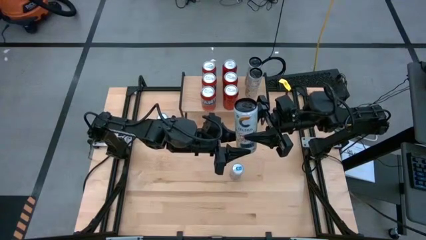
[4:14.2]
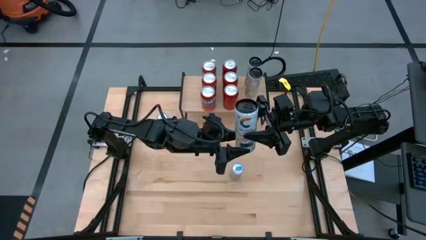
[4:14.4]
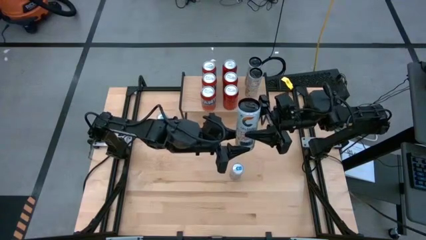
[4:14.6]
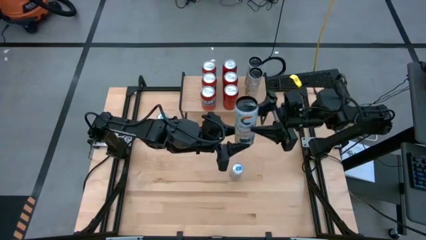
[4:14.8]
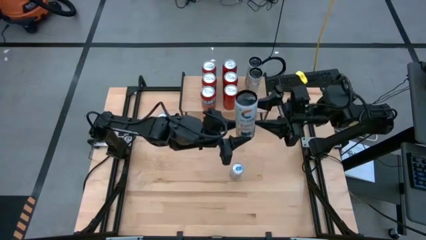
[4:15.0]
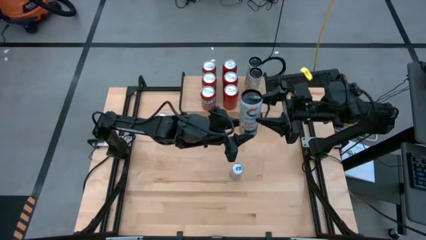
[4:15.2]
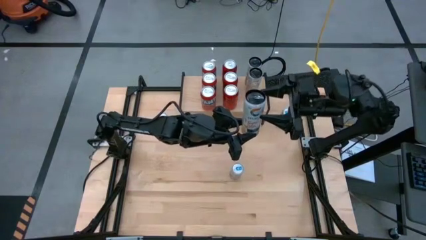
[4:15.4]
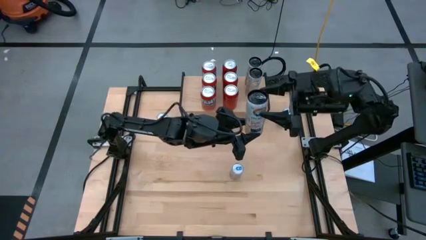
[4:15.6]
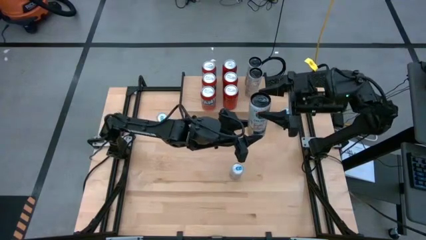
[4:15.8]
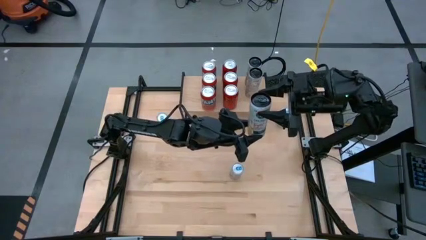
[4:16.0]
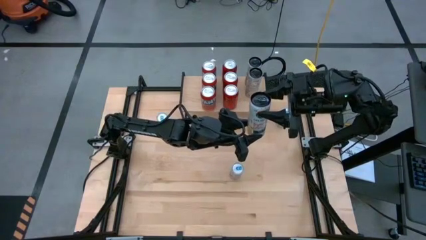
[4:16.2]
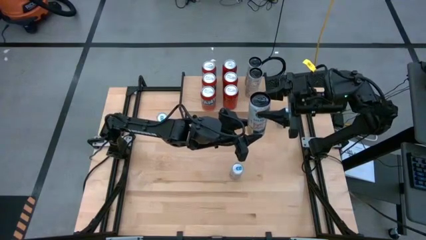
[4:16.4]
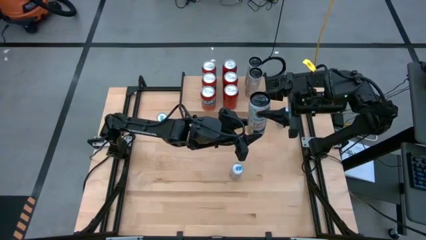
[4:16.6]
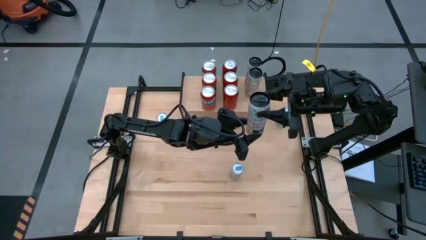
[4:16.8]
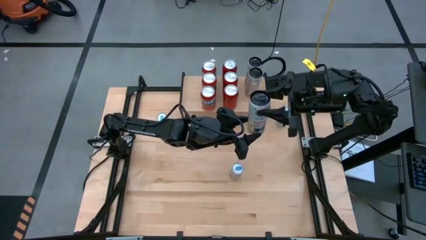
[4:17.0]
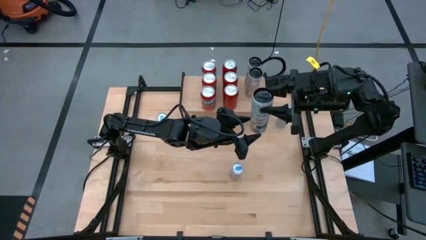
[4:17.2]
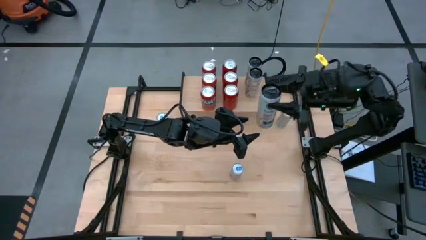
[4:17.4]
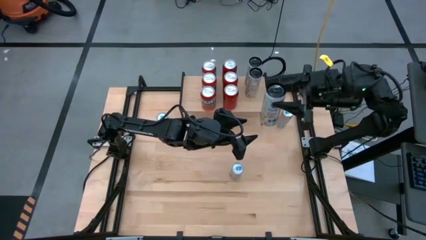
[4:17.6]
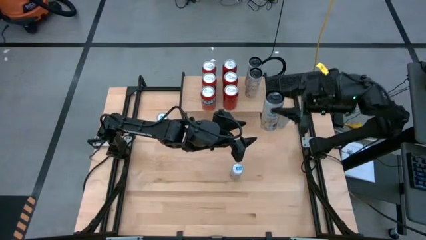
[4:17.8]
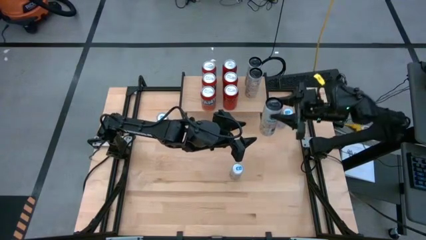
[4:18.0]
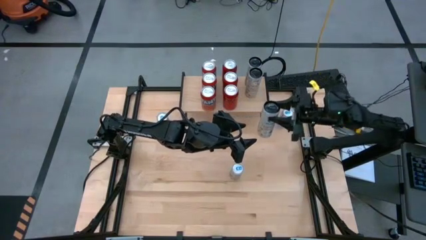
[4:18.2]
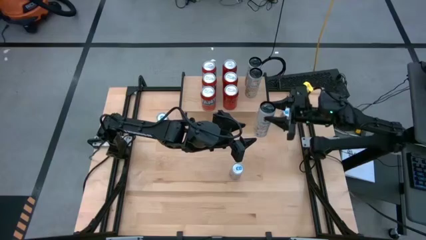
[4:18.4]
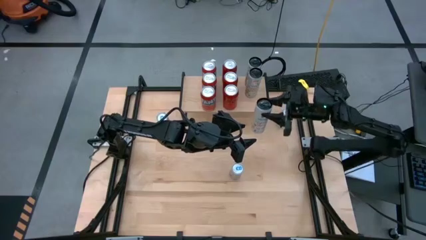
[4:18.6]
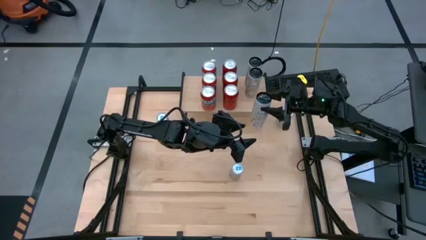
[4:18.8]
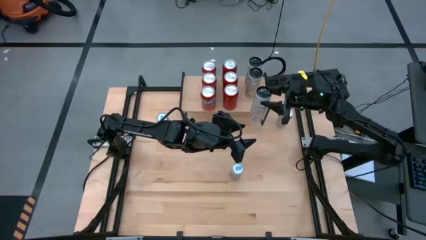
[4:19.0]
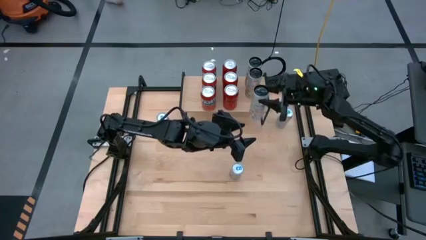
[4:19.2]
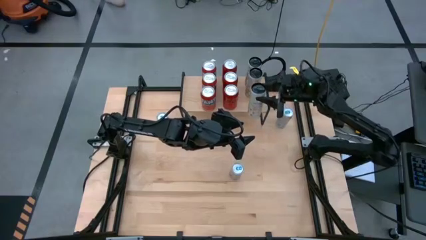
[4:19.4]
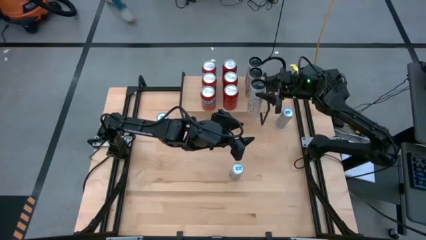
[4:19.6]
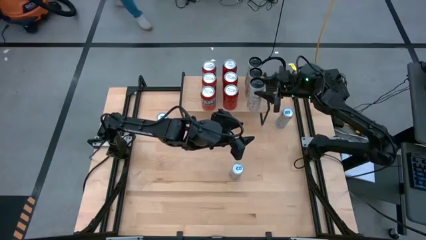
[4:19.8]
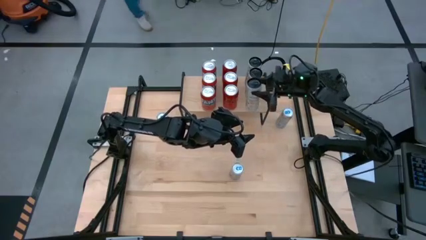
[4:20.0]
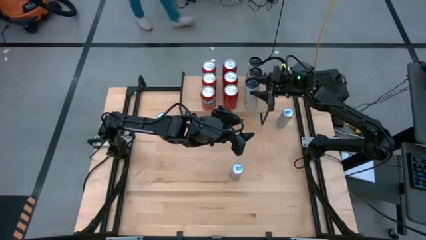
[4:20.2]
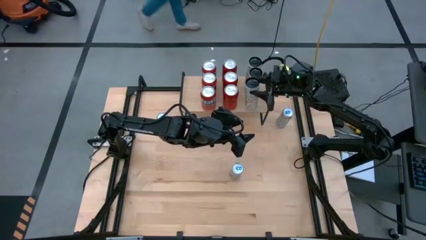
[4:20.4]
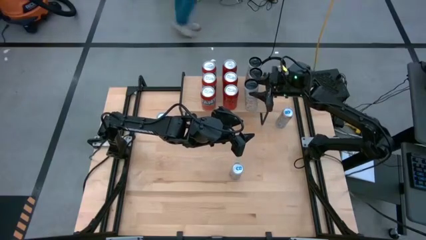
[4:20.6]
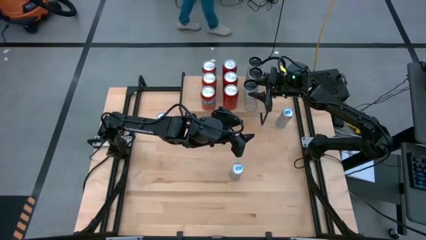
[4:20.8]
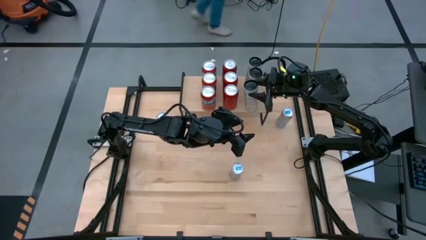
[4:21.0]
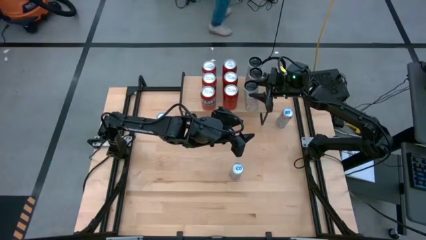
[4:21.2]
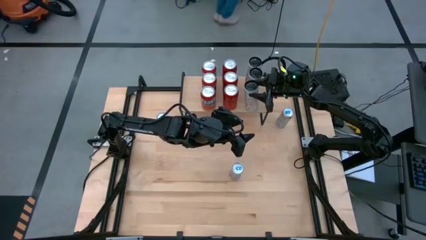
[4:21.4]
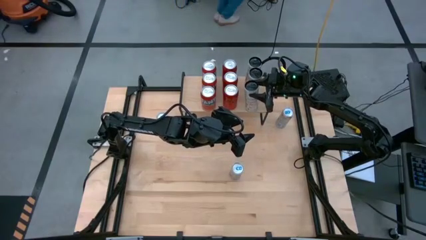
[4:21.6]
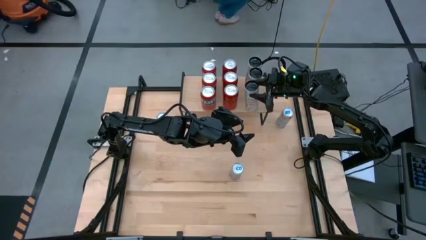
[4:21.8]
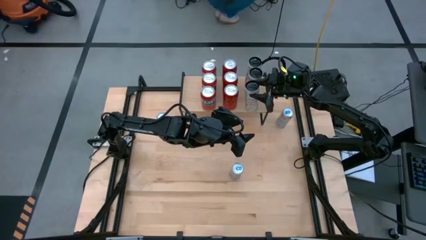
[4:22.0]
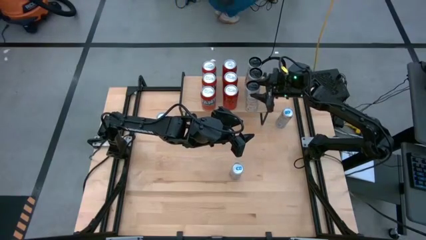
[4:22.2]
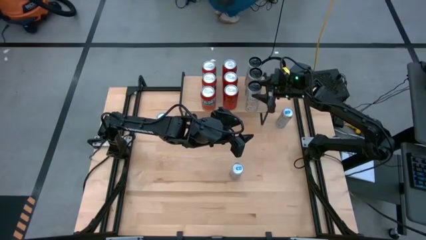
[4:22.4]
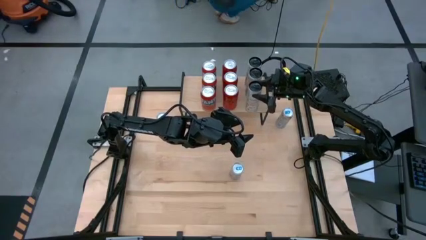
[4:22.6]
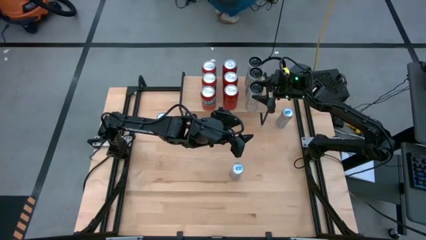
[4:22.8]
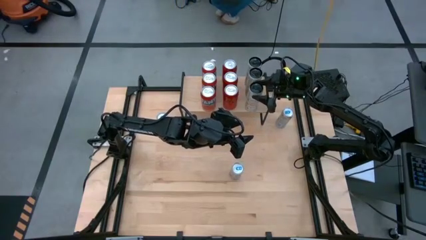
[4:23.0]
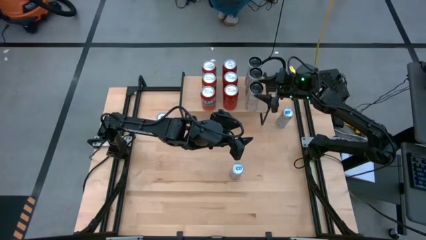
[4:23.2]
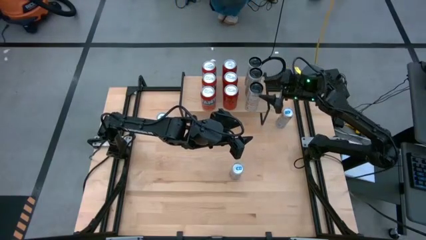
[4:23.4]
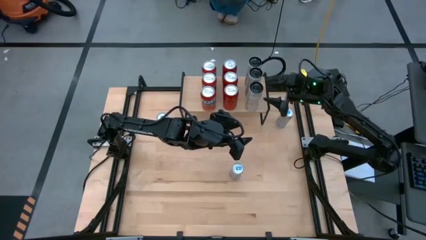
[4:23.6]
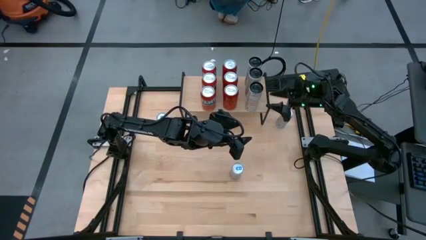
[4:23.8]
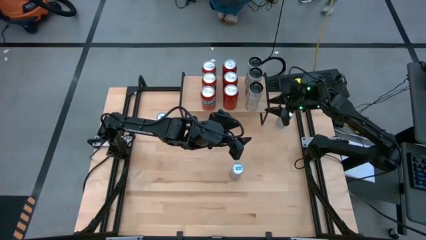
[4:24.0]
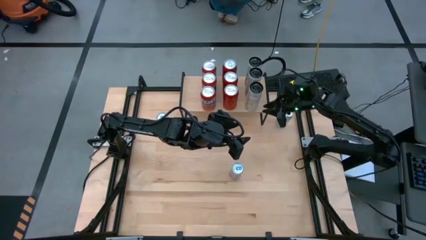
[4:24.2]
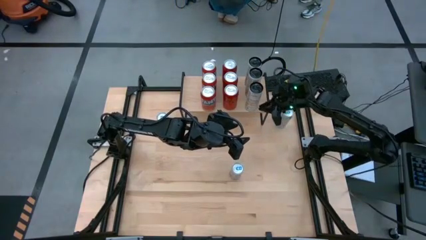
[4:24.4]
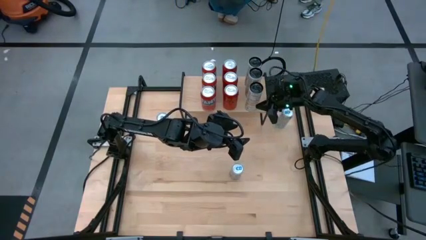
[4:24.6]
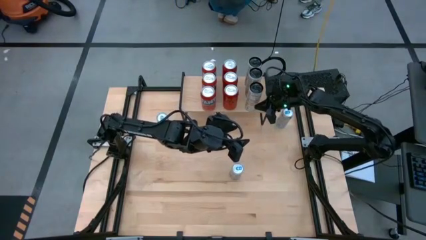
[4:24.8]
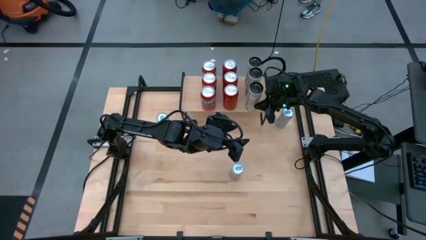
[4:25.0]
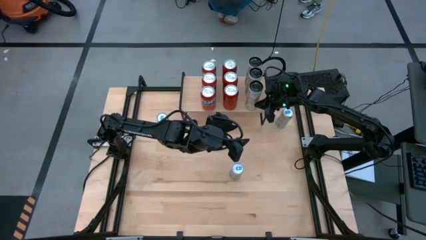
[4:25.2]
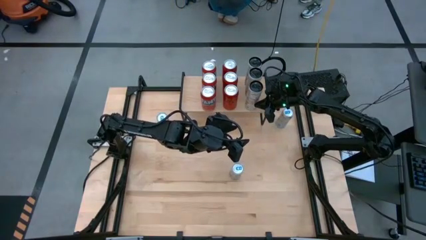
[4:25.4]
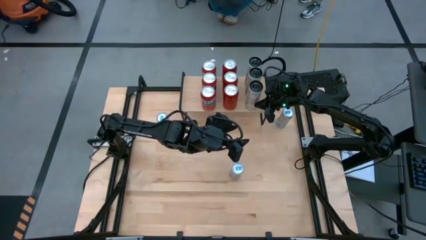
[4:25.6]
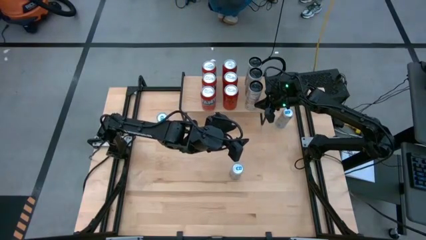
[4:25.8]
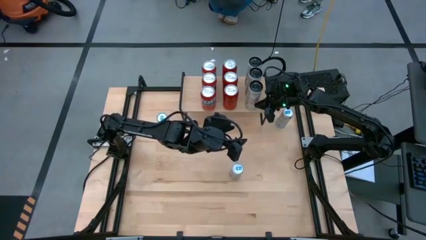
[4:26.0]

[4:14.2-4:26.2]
Task: Place canned beverage on shelf
Put the white-yellow soda can on the shelf aligned with the other white-yellow soda can

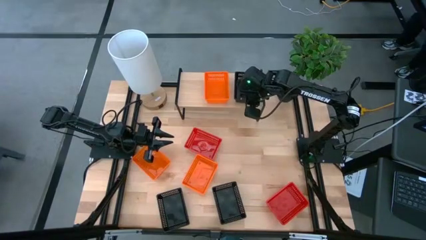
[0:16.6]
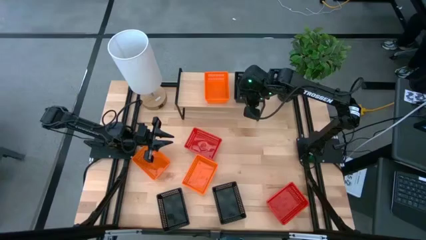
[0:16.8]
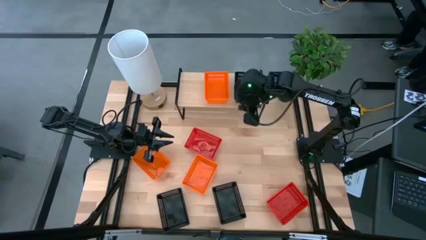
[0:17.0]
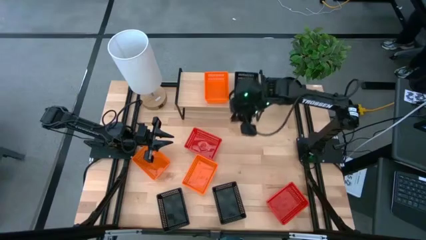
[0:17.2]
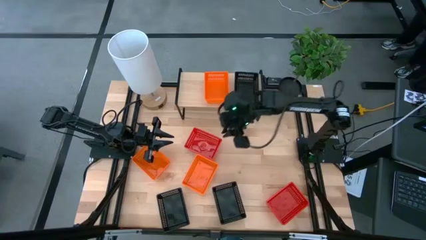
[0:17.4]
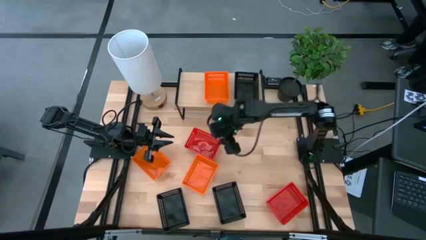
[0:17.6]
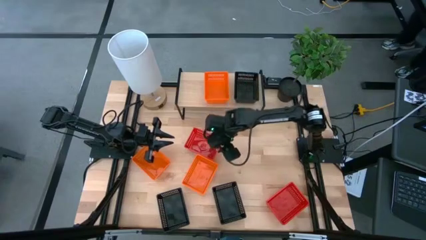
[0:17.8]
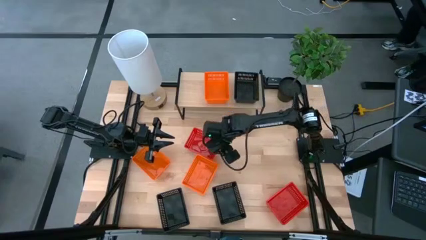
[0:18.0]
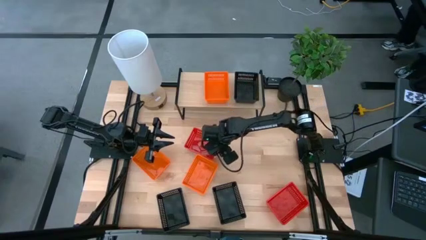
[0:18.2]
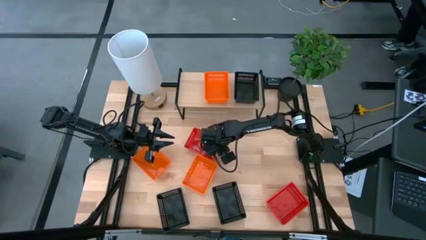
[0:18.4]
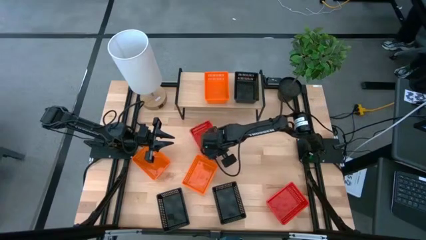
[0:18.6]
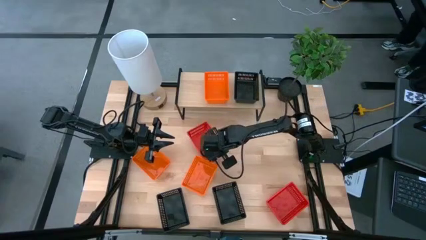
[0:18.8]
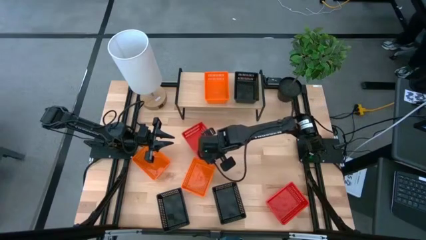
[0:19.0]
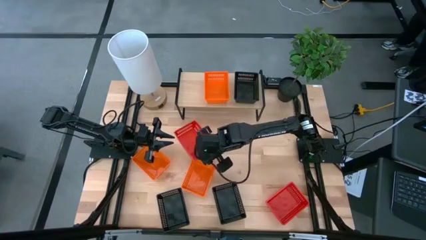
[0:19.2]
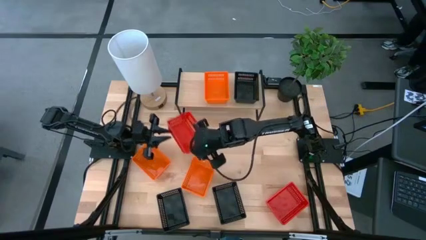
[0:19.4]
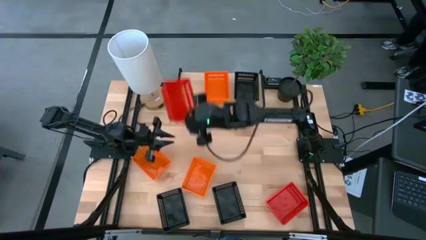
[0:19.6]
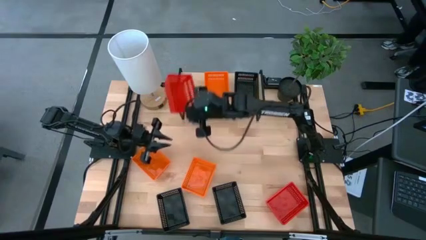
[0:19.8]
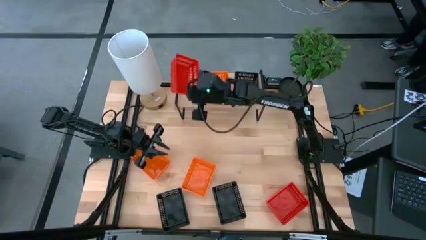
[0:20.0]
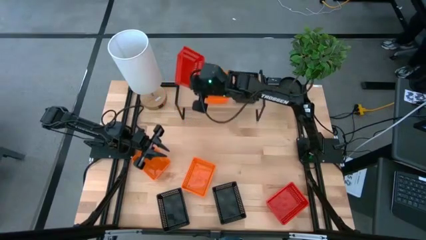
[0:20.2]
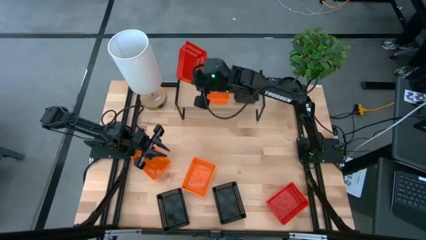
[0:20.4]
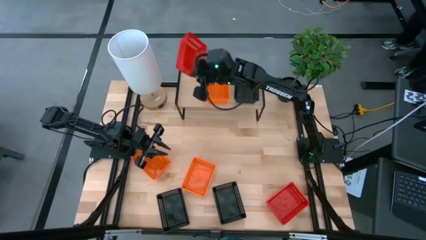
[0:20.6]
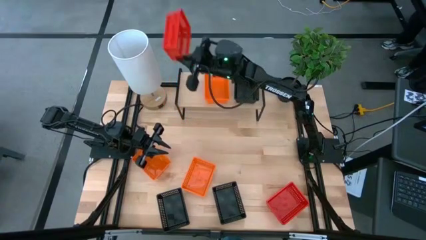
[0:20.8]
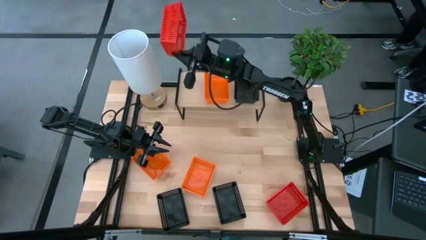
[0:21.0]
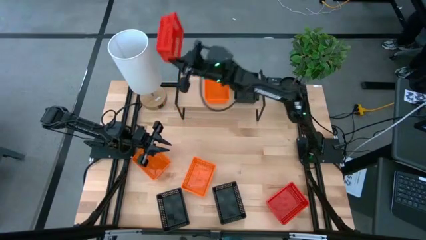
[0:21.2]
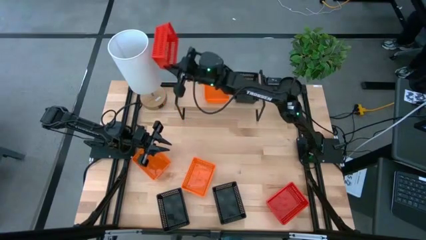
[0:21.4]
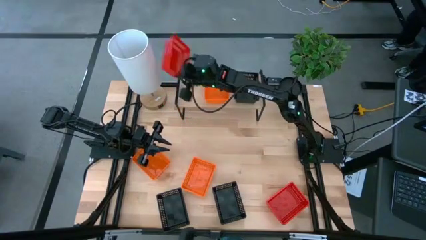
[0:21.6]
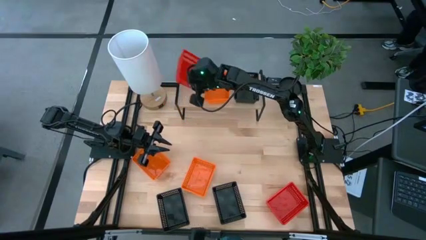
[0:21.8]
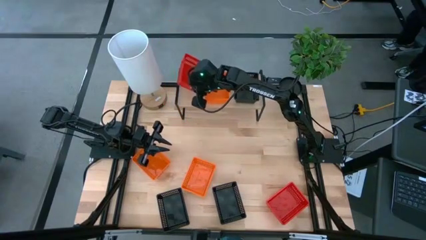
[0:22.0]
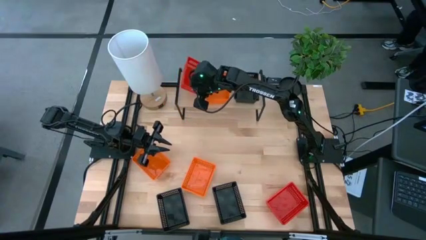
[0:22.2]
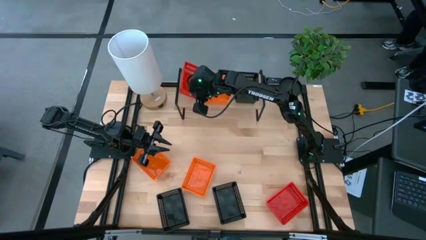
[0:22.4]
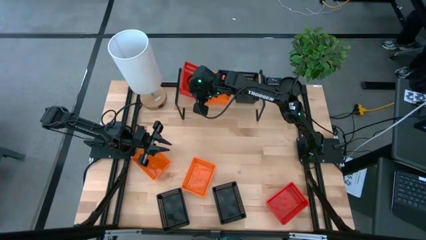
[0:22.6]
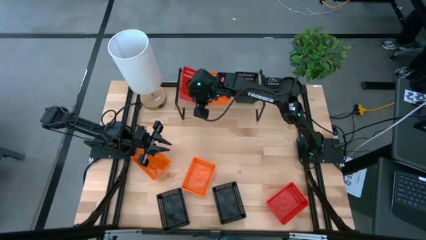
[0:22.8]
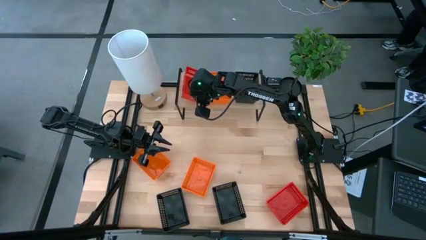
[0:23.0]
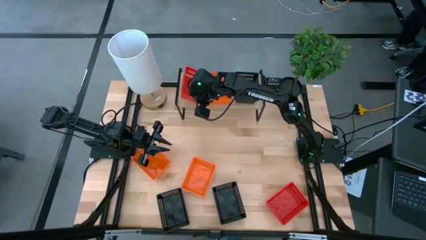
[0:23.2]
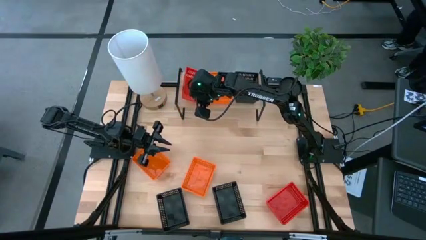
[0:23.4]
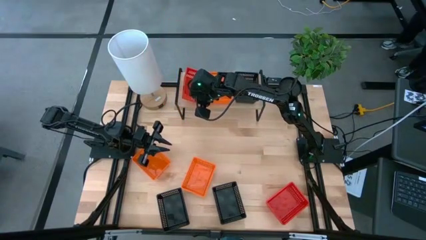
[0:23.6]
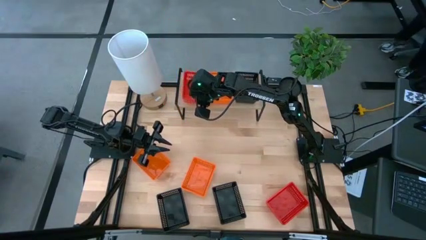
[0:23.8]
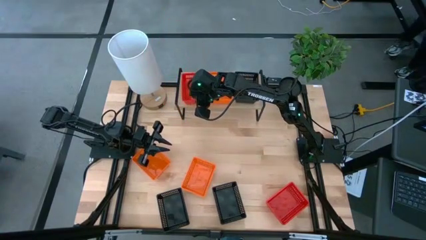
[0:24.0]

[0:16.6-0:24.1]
Task: Stack baskets on shelf by color
Put the top red basket on the shelf
